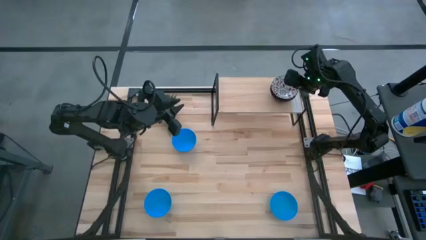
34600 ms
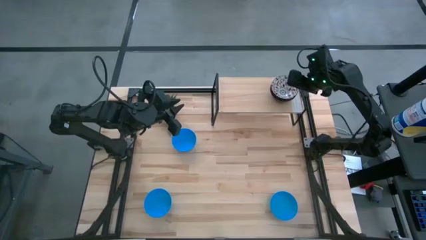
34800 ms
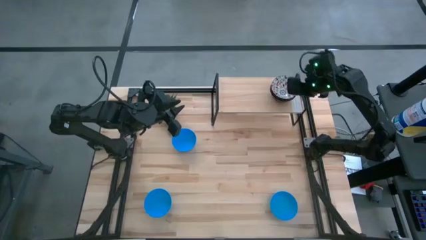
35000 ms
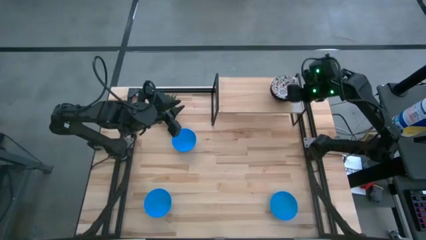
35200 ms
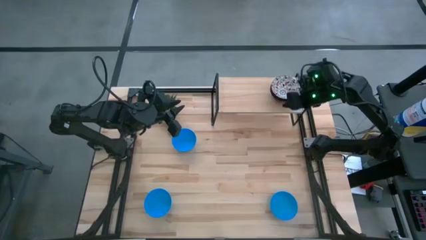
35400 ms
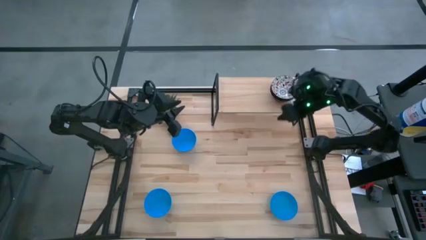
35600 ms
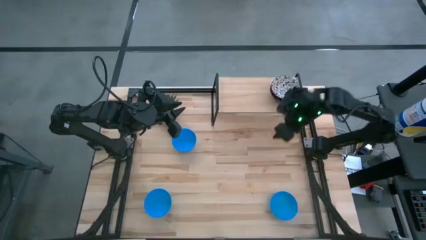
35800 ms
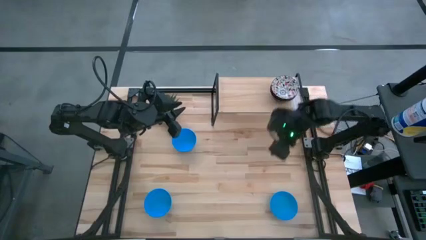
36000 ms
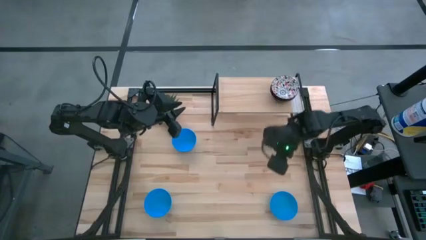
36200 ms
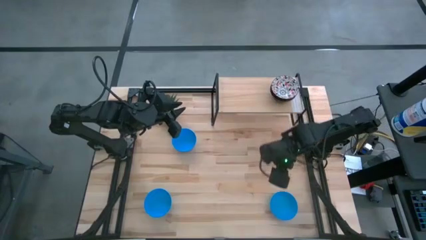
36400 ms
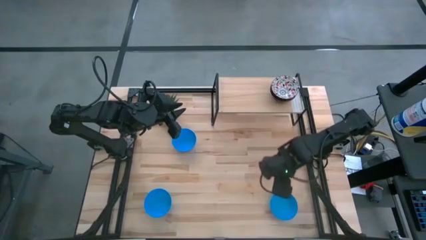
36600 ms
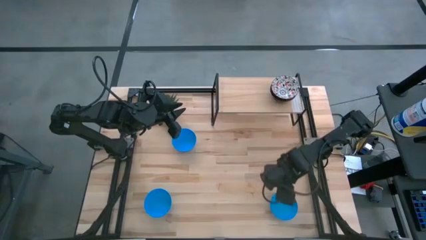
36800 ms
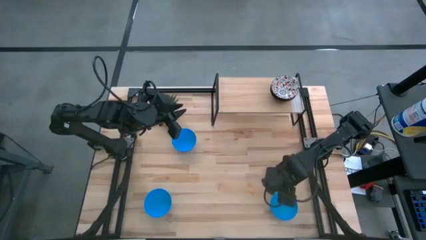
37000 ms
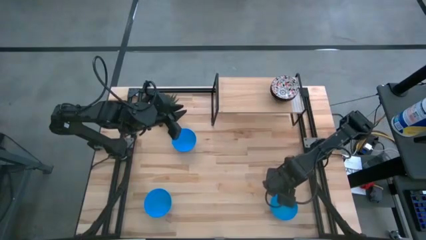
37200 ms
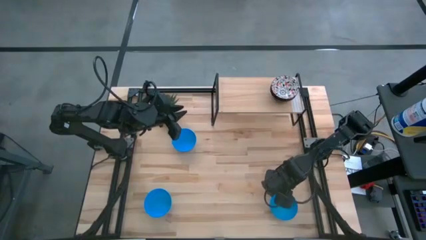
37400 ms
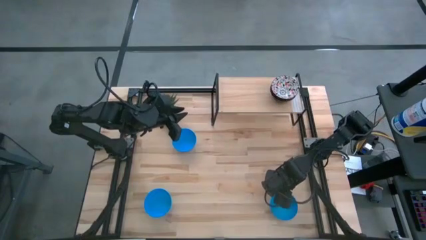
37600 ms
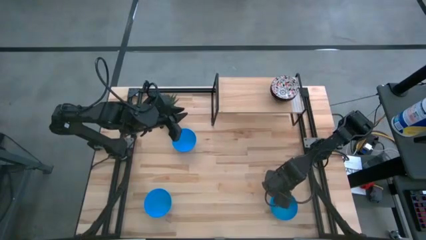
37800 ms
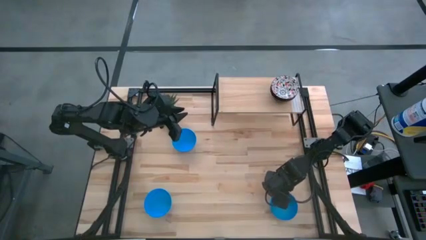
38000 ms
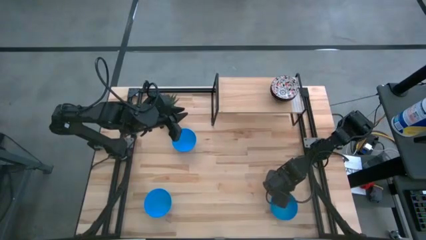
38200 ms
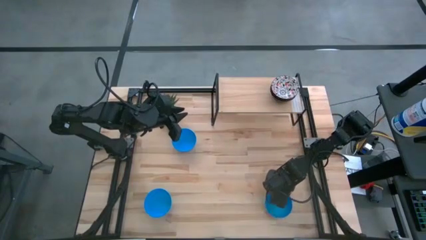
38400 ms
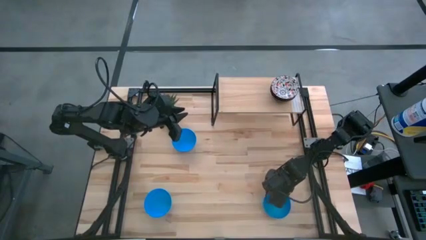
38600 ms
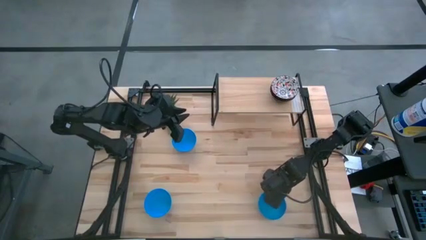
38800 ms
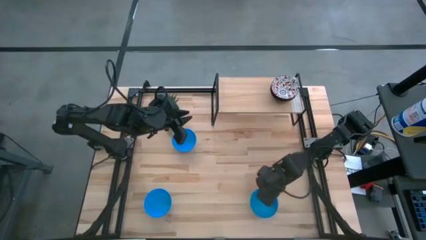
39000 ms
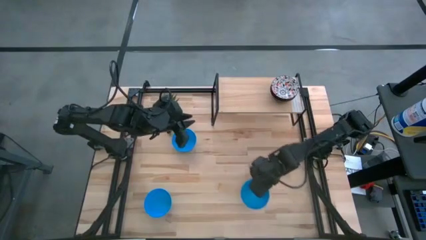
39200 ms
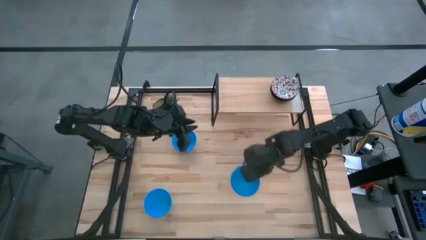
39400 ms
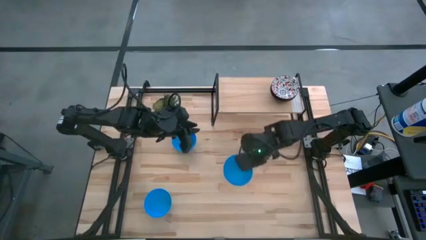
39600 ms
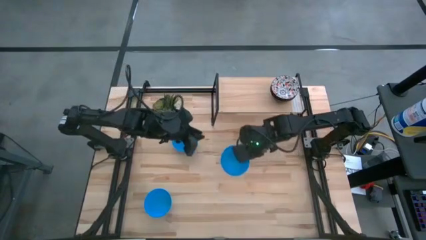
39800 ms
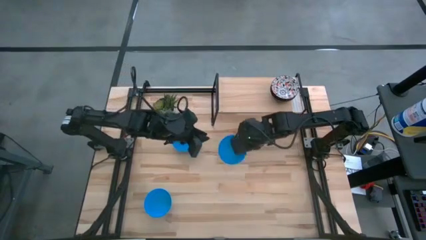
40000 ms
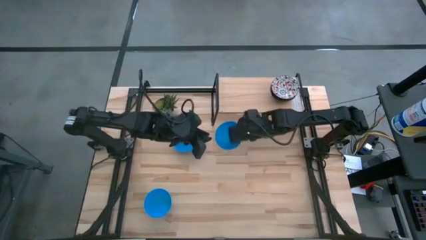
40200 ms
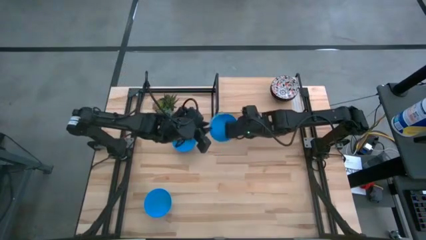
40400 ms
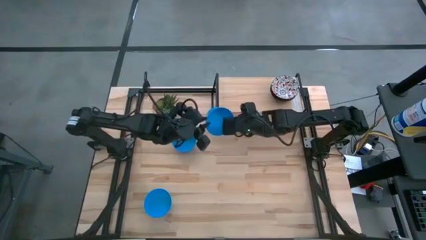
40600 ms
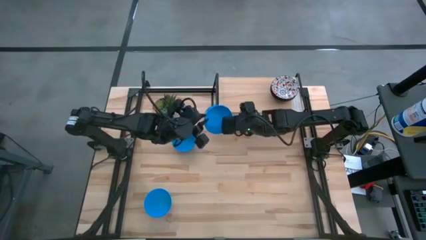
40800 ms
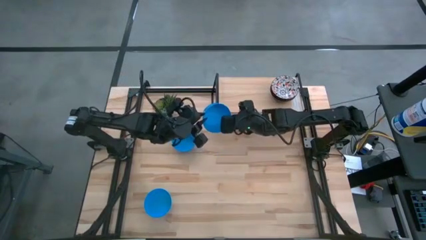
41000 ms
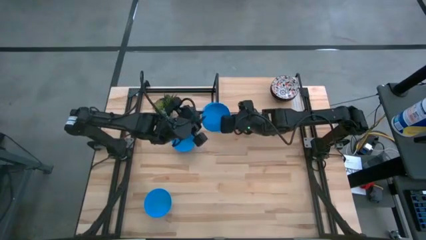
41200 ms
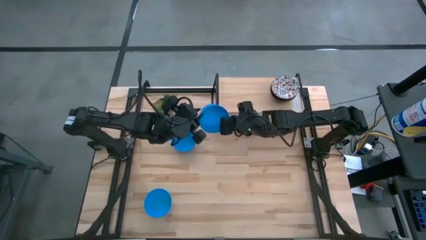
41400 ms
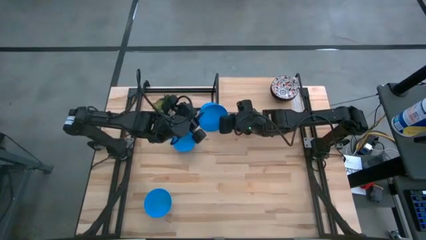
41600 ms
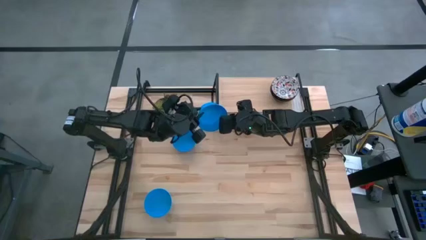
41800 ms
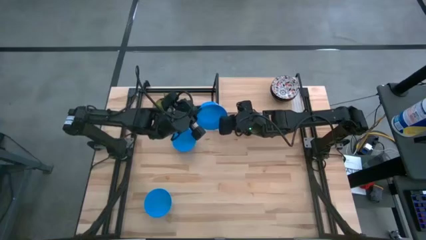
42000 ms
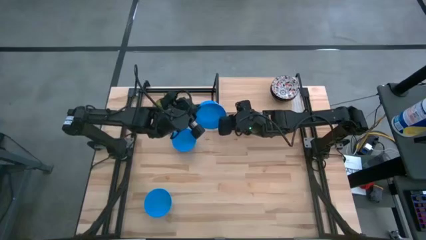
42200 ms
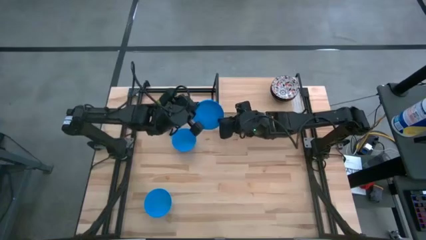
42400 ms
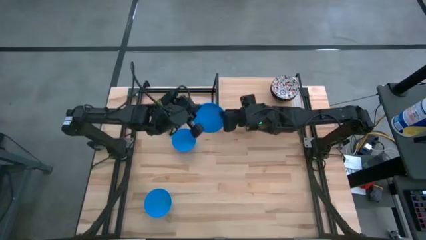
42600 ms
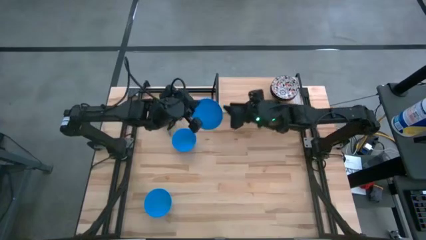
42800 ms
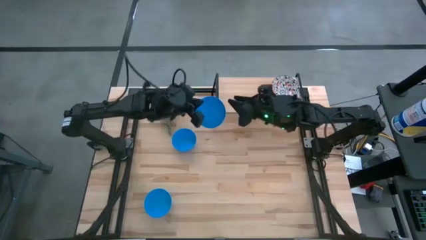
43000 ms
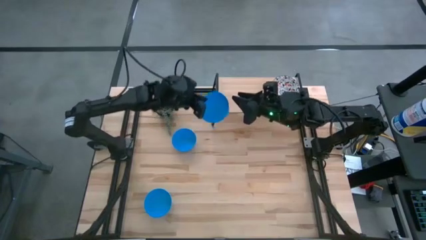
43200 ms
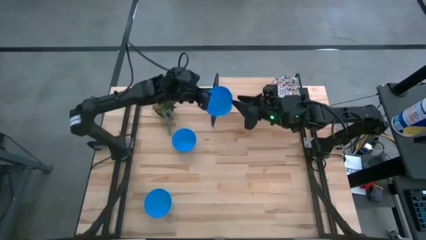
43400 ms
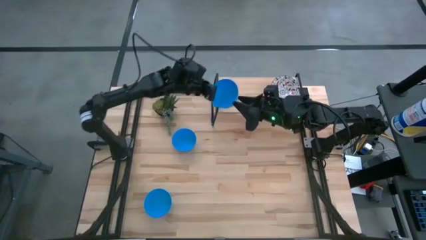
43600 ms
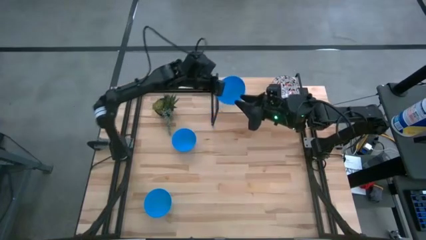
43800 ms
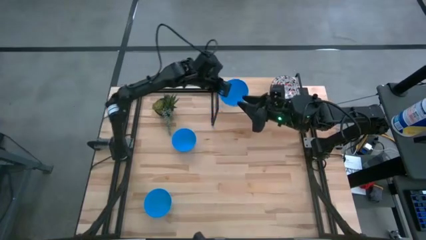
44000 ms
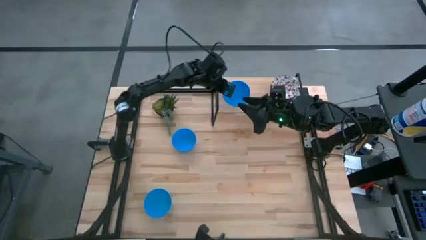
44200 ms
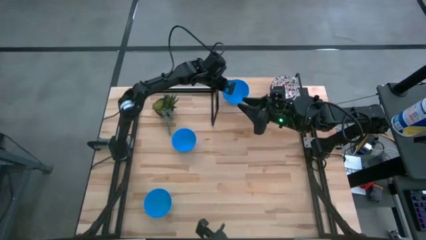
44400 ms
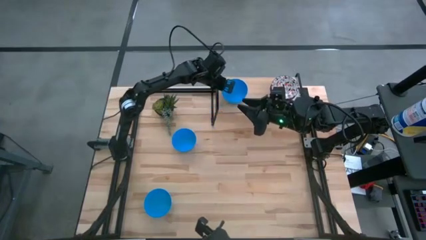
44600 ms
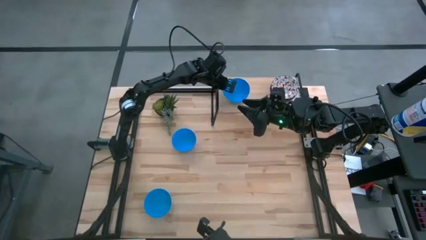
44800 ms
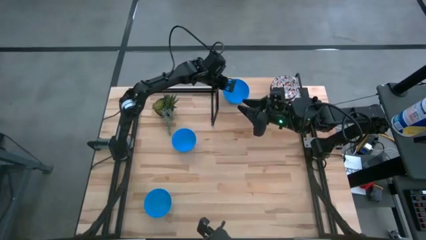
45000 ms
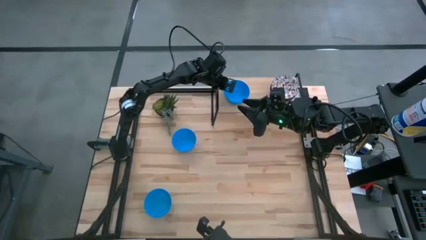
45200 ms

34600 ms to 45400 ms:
Task: Pick & Place Mini bowls
Put the bottom right blue bowl on the shelf

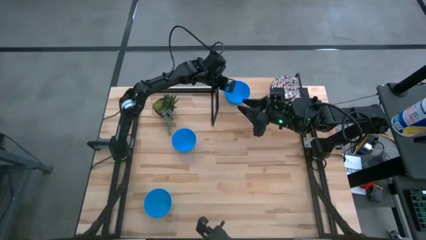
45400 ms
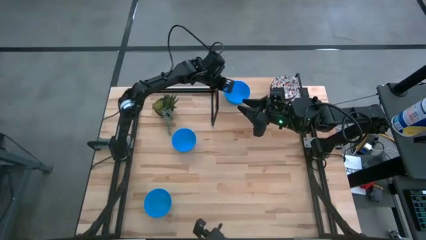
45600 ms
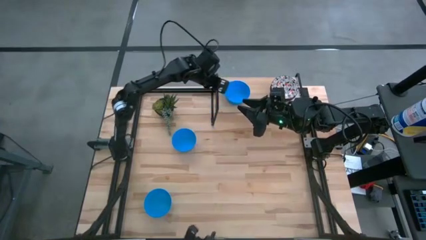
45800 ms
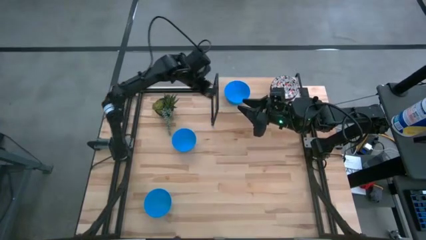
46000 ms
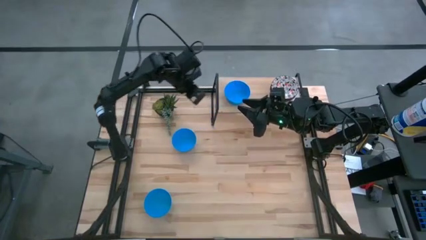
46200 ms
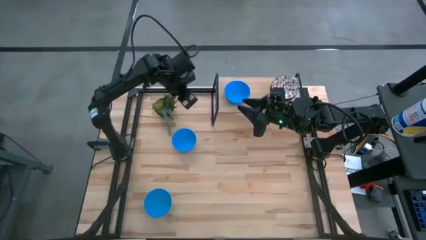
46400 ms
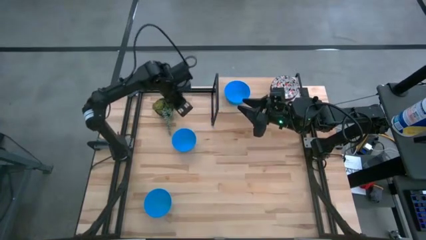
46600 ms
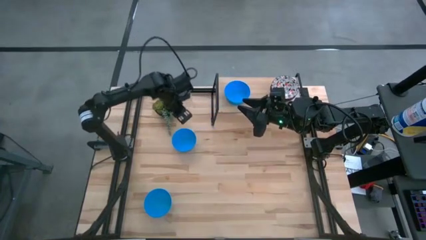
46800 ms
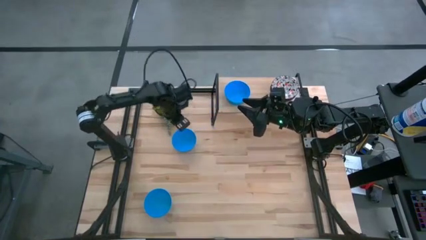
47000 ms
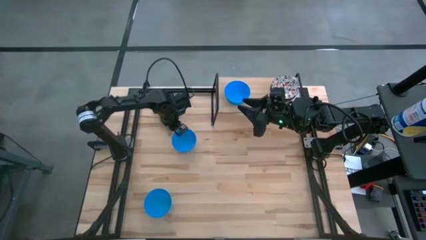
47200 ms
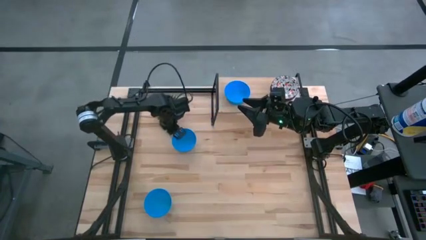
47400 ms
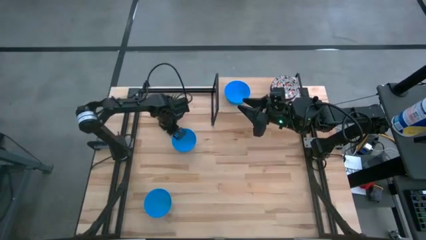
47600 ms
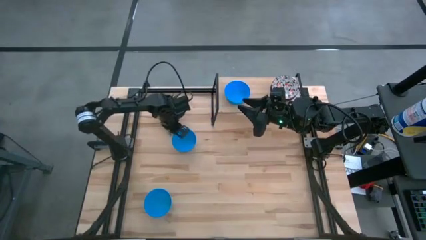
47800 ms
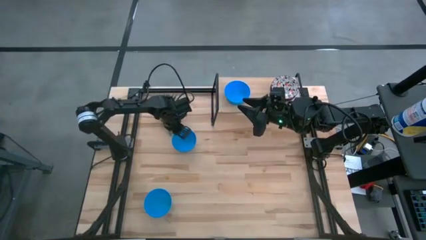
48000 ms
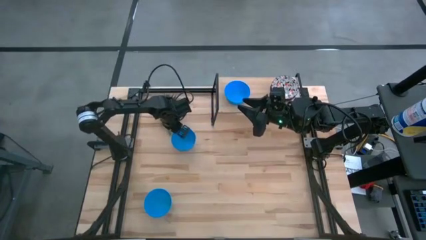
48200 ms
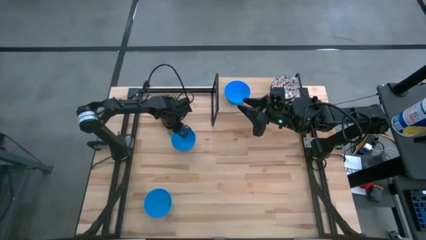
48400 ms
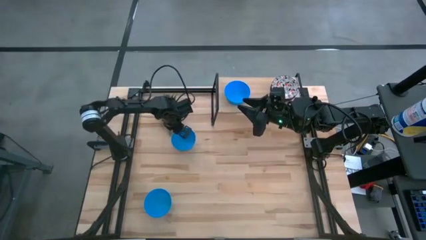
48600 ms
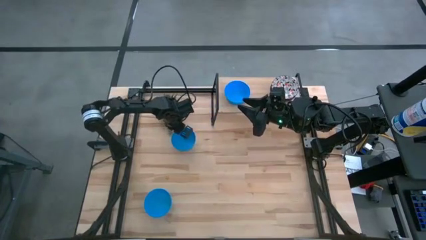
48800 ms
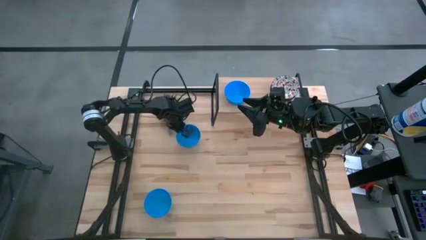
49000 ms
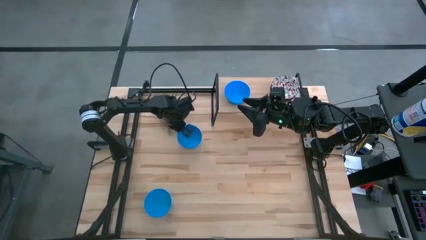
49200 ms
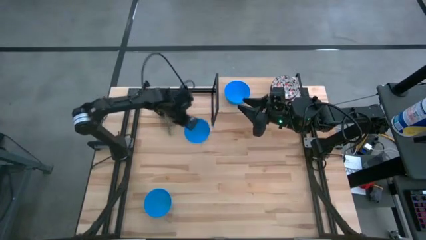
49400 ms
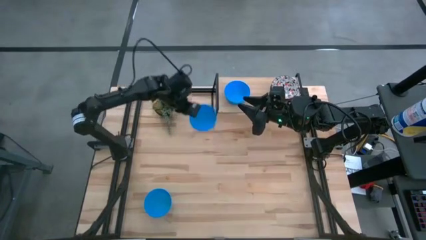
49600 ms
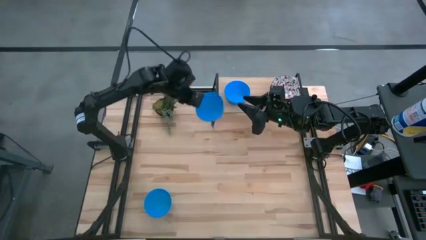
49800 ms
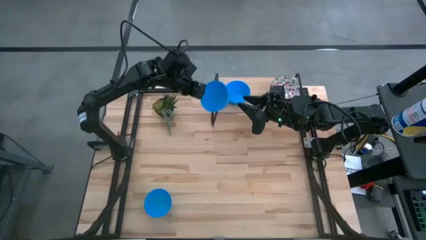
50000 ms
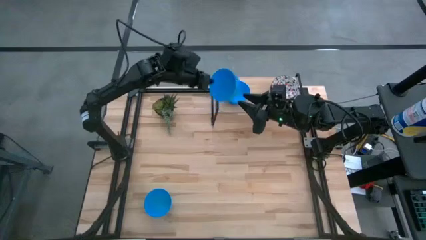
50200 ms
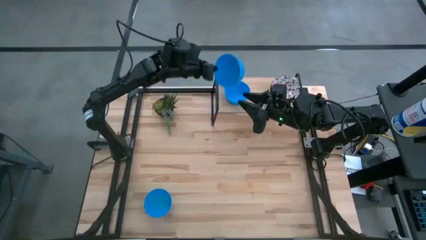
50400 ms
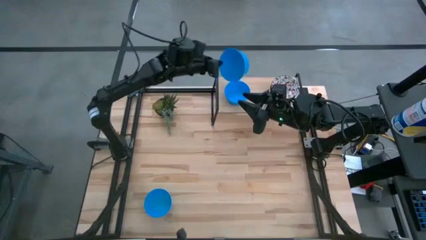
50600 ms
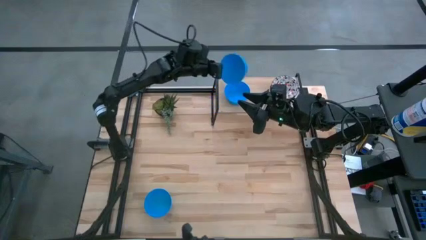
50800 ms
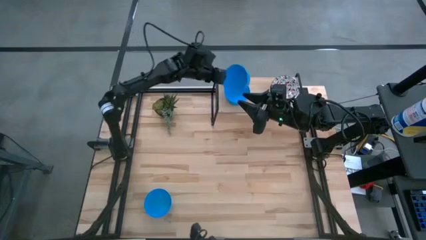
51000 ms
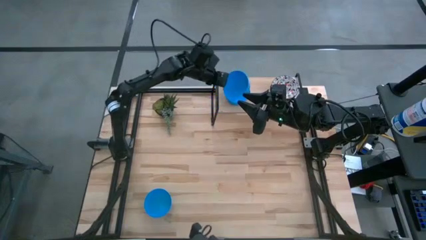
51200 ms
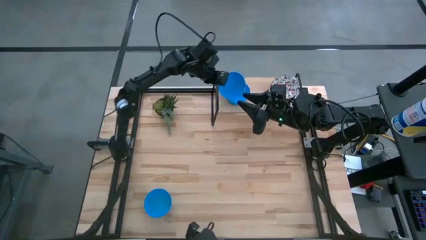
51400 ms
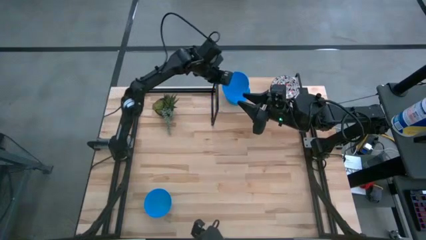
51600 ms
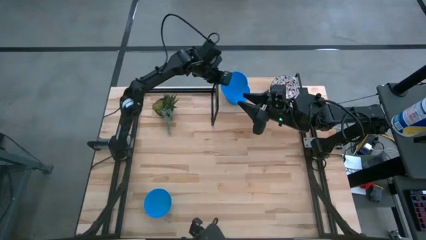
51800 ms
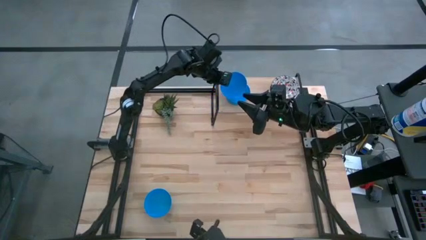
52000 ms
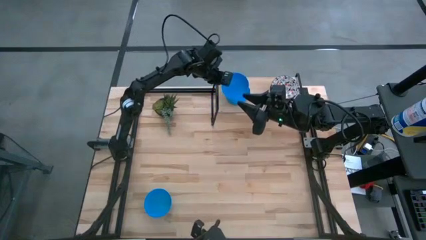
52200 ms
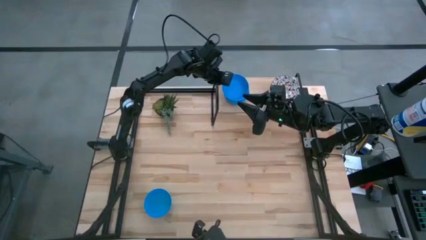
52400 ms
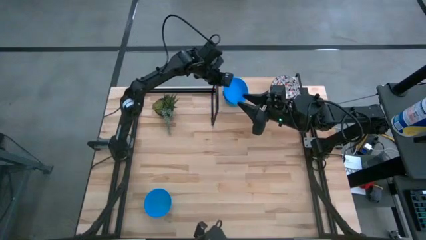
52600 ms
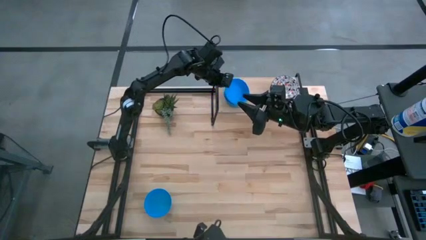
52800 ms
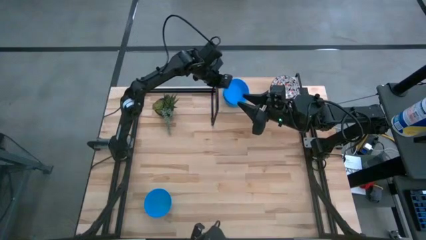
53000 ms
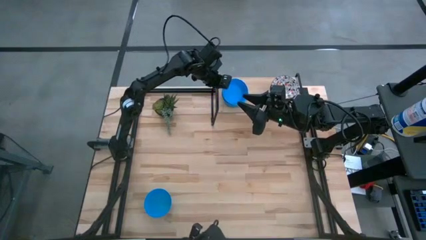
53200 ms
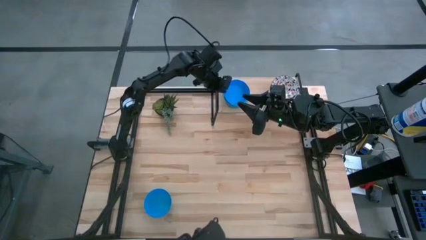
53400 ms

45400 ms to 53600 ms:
Stack the top blue bowl on top of the other blue bowl on the shelf
